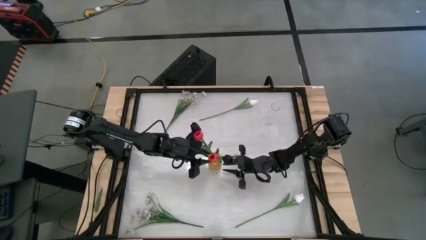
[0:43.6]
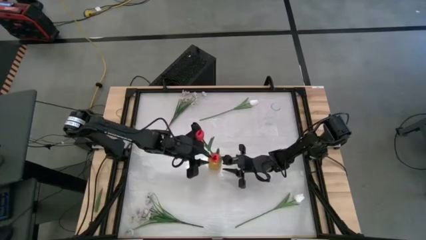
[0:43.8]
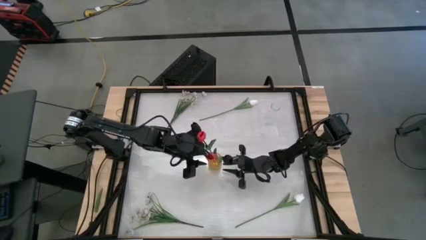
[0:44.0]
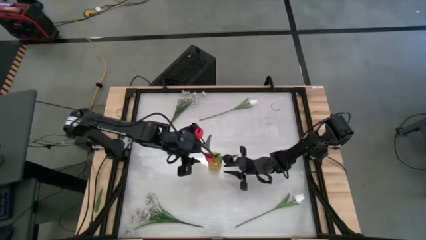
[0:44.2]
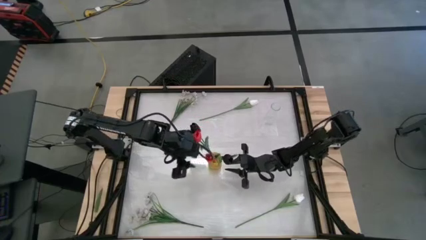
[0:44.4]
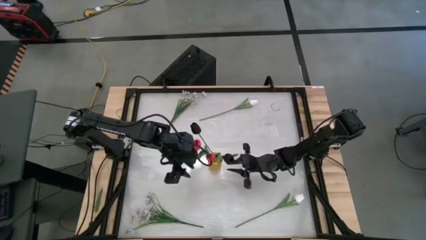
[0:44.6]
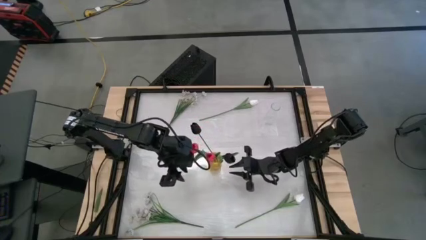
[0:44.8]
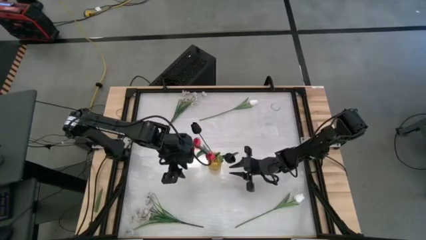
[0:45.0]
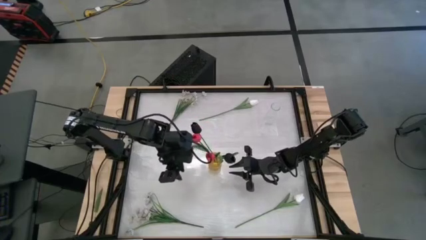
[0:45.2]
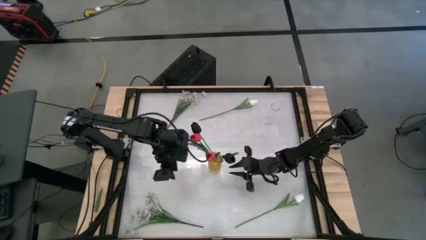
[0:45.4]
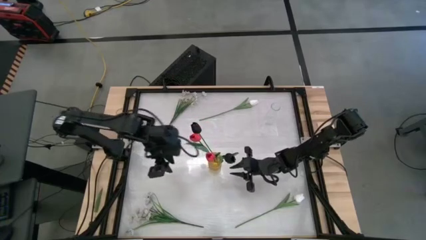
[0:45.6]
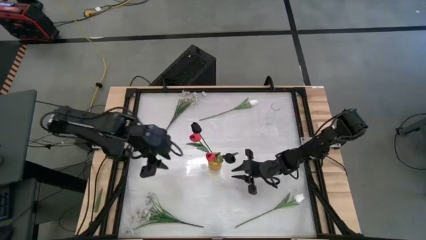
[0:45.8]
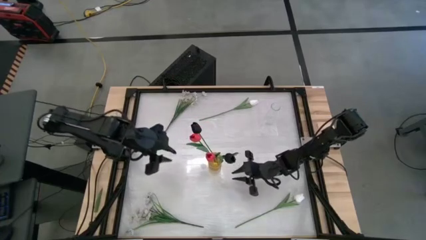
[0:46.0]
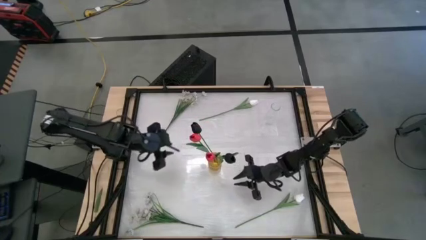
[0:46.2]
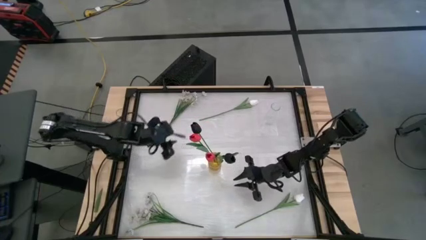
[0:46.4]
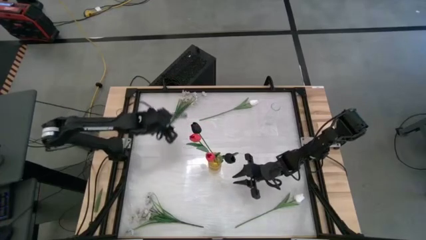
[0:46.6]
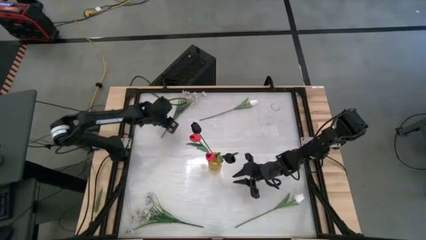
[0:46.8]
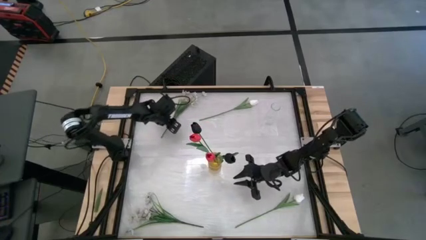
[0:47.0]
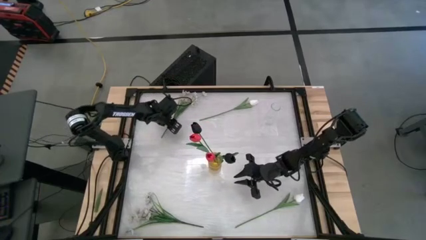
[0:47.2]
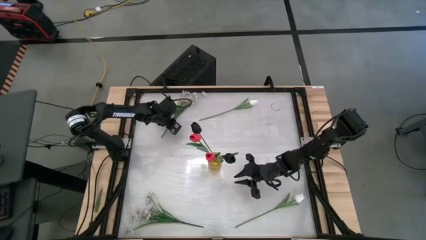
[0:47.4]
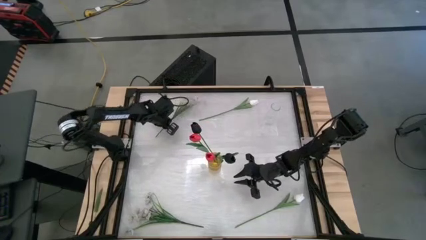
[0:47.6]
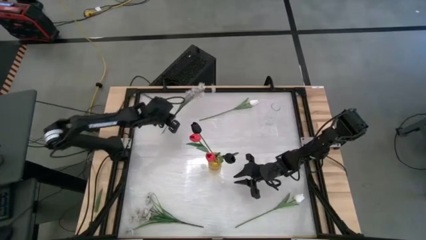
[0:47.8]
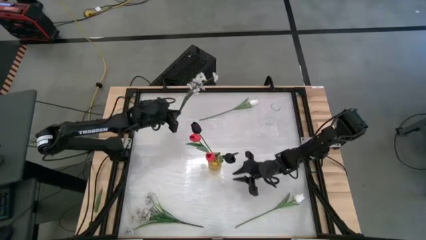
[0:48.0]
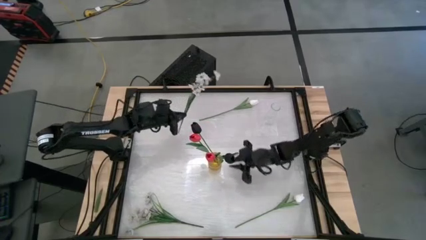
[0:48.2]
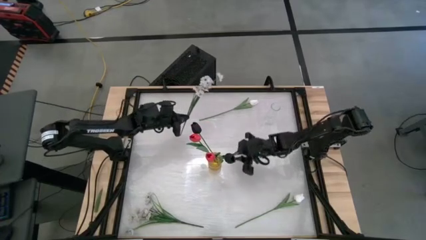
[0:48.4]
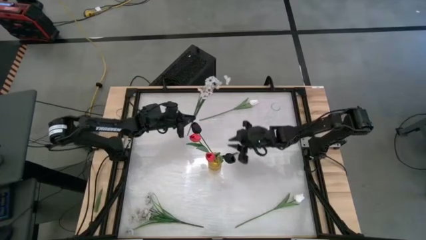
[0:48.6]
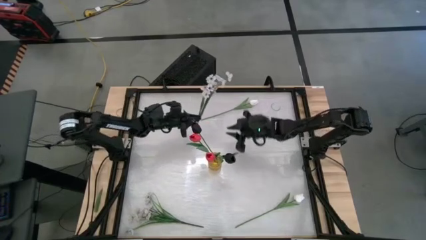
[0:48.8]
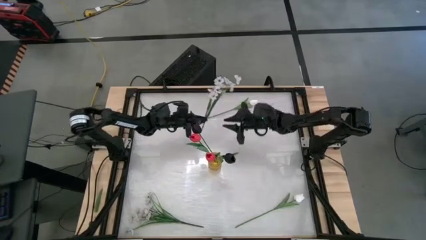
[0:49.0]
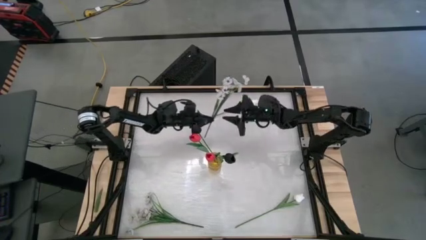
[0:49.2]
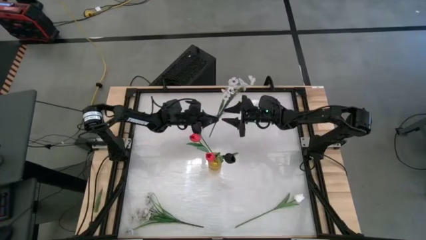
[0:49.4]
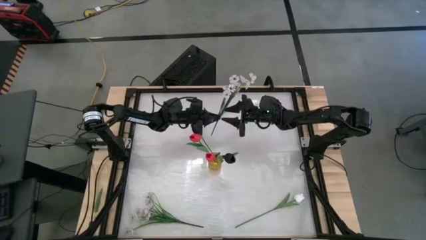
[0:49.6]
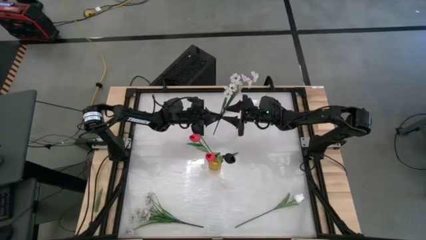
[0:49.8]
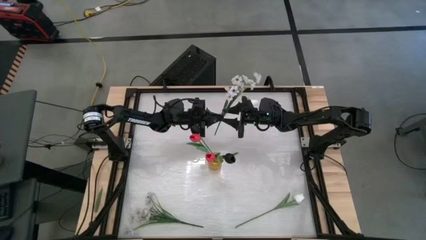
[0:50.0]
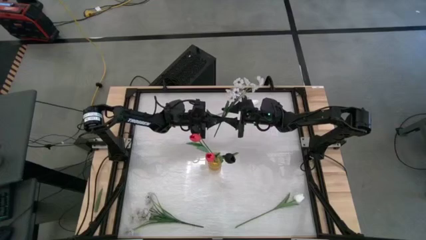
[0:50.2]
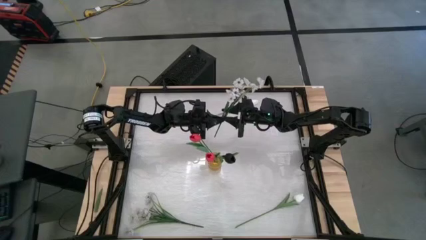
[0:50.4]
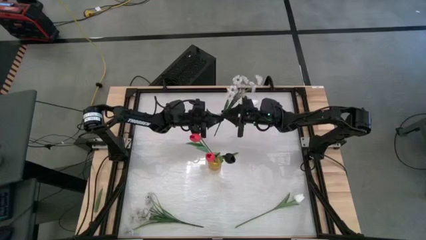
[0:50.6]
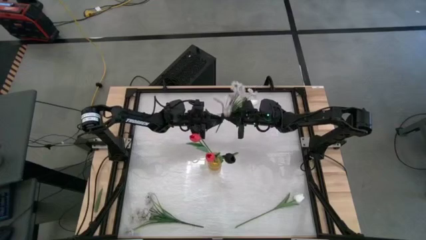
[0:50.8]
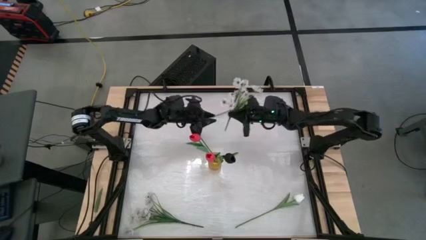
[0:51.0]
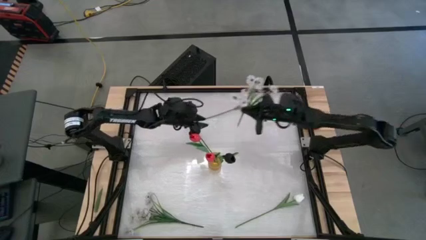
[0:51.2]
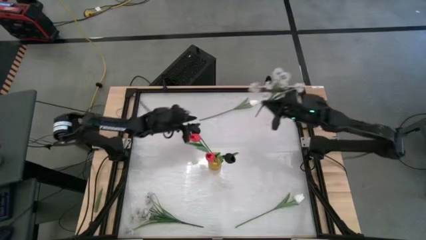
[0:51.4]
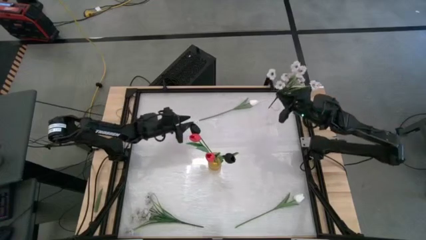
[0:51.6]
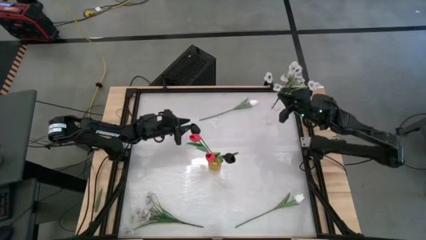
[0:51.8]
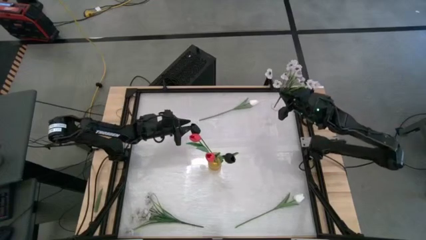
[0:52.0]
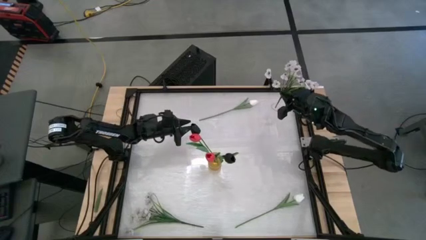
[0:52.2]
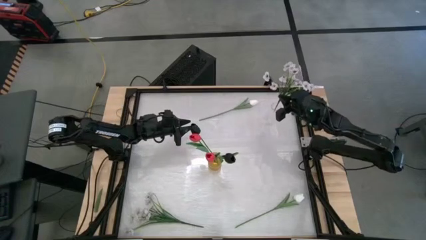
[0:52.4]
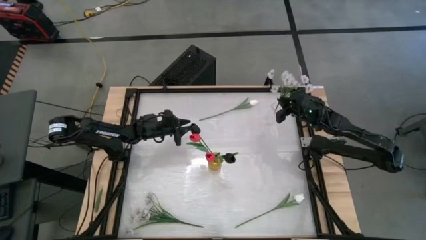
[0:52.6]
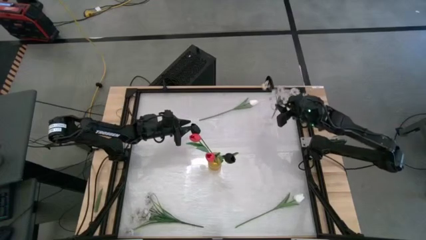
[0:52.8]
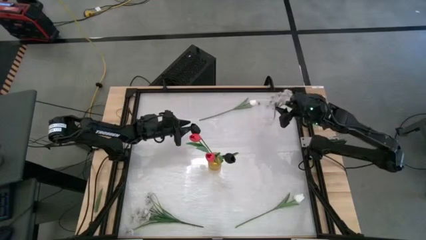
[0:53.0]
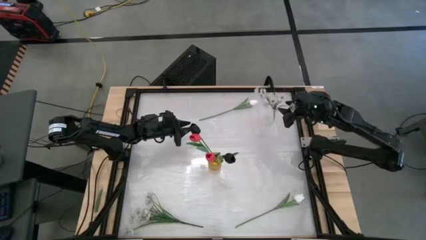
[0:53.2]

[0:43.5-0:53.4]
Task: Sort flowers into vase by color
Put the top white flowers into the transparent vase

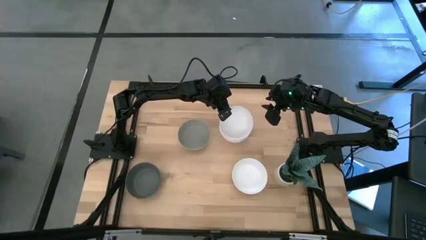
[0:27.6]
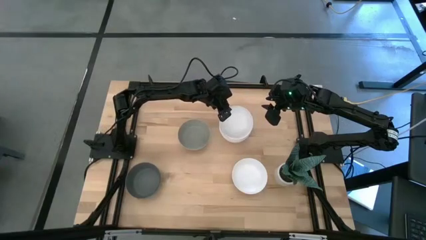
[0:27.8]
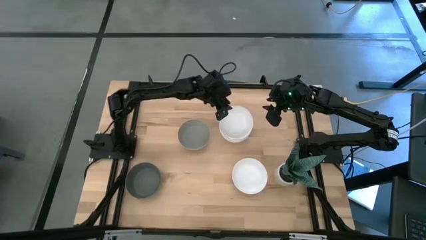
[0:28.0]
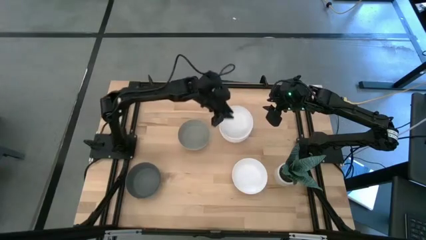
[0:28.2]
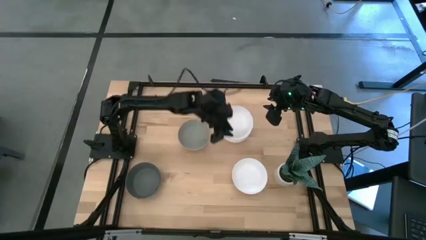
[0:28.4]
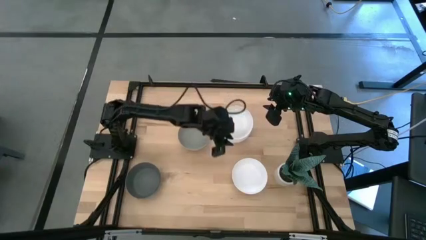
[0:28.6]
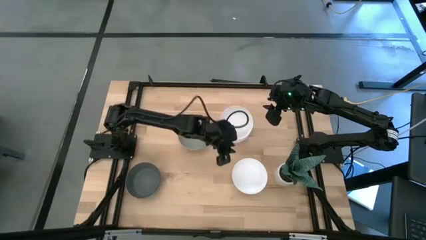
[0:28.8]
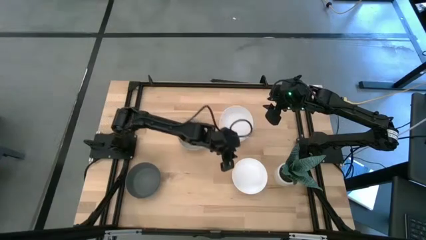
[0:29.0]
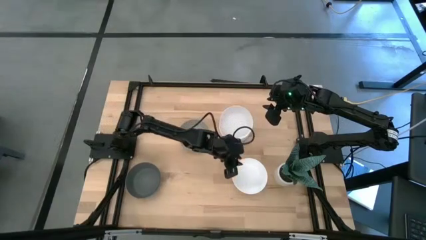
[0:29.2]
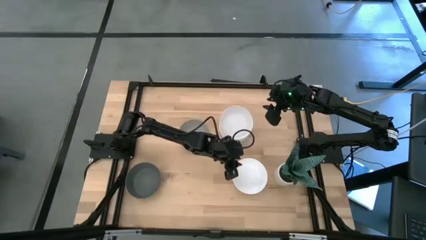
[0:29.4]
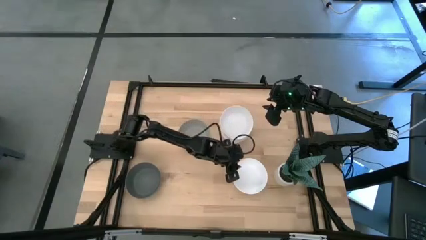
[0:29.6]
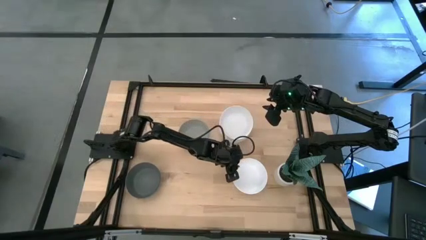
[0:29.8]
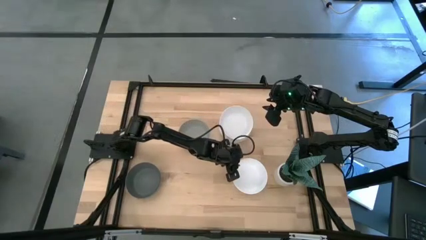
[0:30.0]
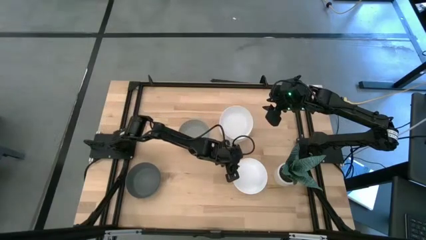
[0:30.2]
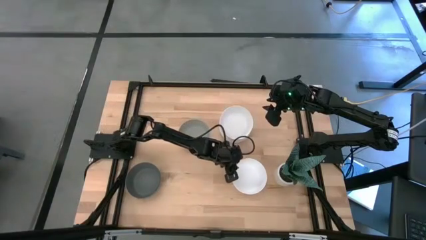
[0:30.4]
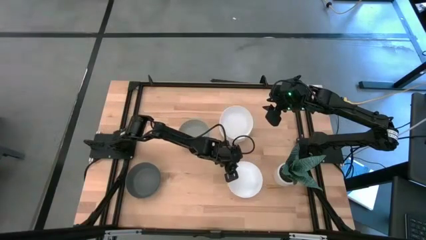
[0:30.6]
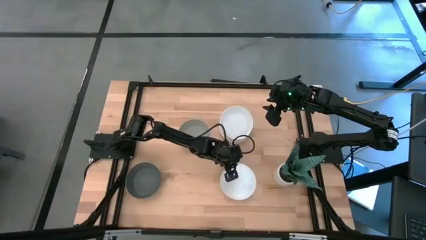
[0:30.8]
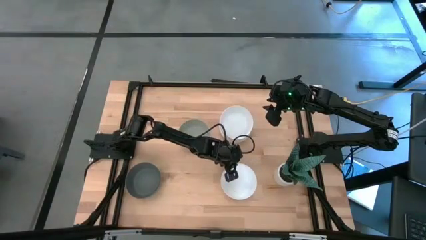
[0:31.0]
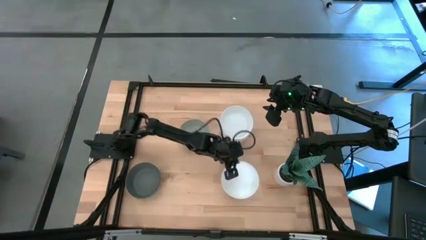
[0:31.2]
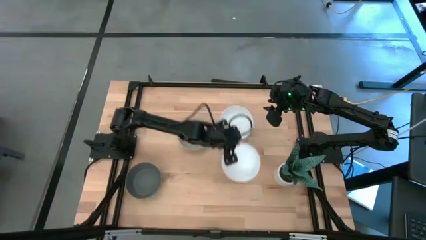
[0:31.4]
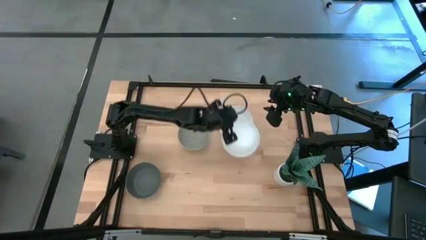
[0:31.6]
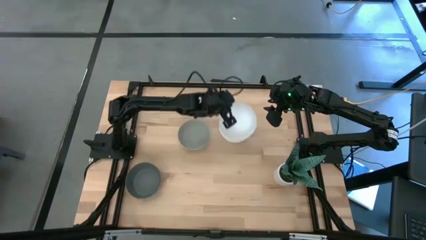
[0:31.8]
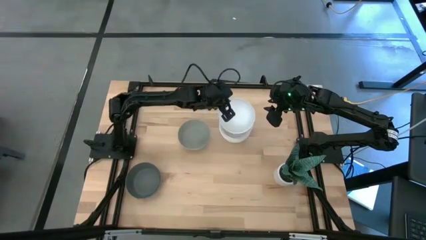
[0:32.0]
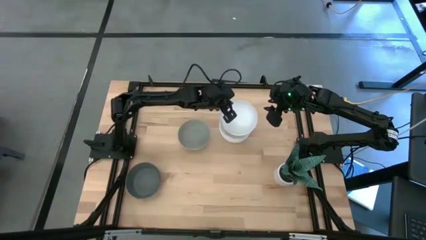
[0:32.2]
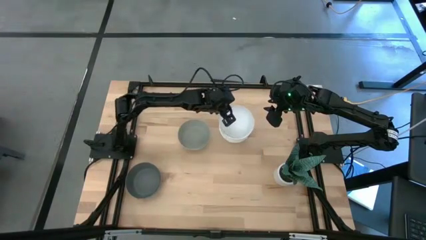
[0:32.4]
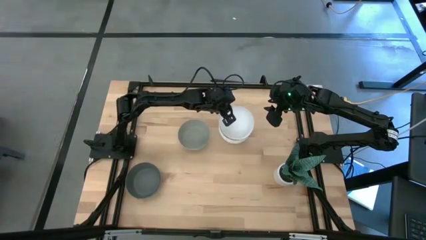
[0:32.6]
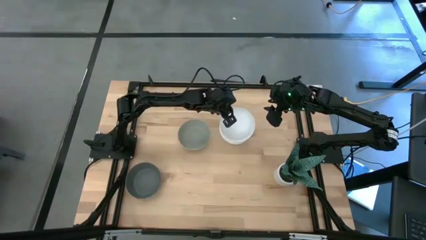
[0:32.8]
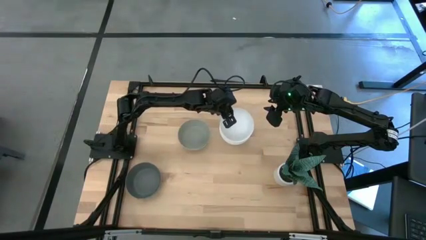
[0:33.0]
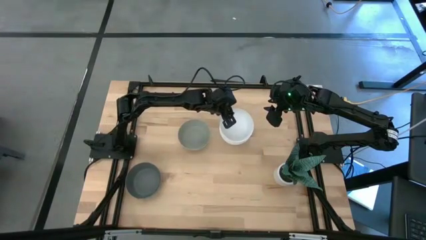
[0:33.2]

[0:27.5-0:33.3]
Task: Nest bowls inside each other
Stack the white bowl on top of the white bowl
